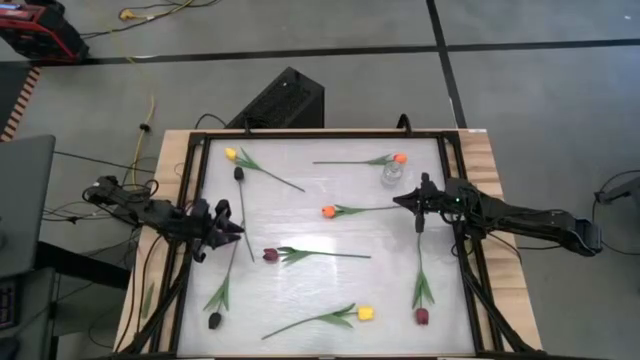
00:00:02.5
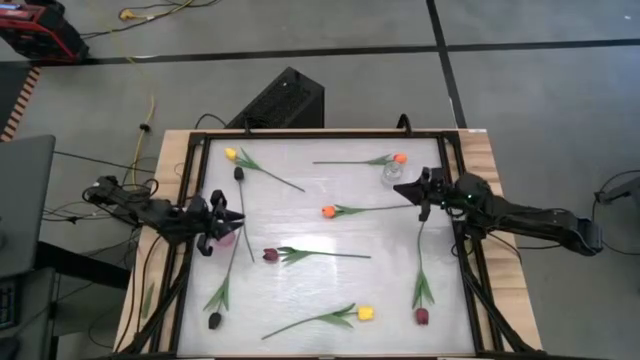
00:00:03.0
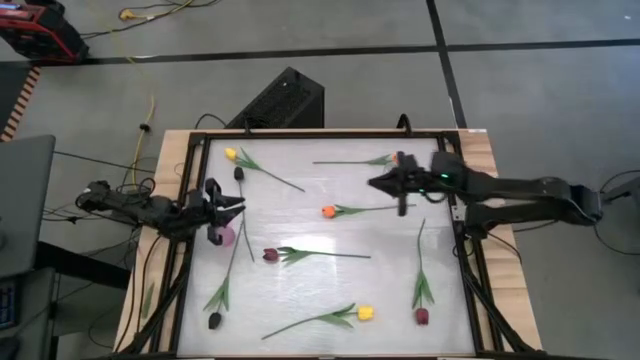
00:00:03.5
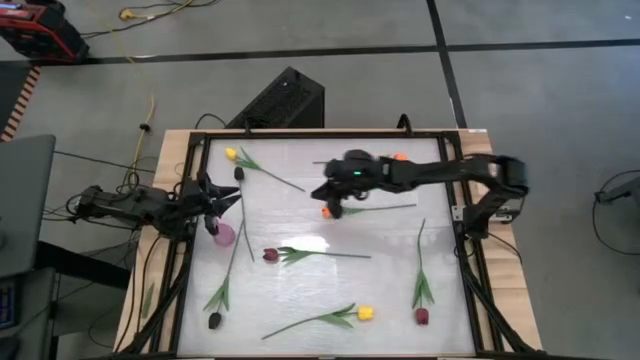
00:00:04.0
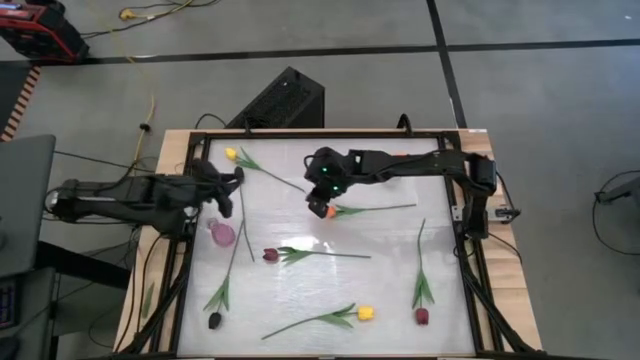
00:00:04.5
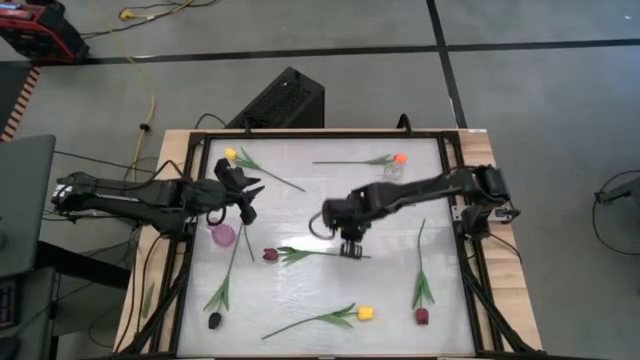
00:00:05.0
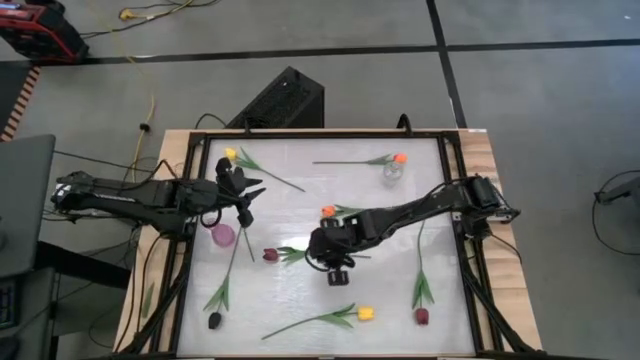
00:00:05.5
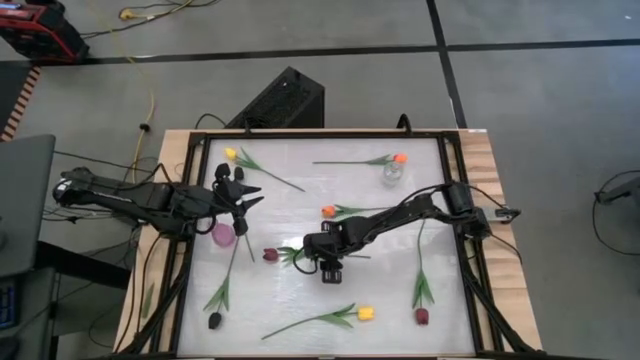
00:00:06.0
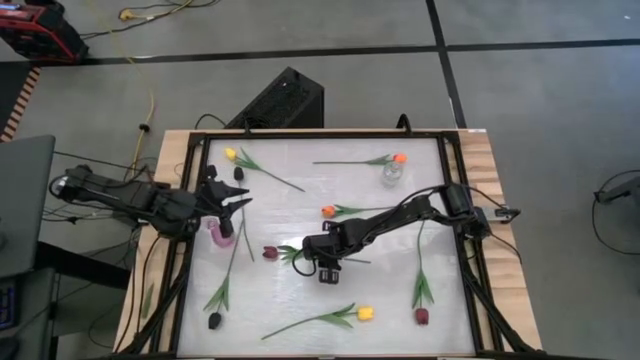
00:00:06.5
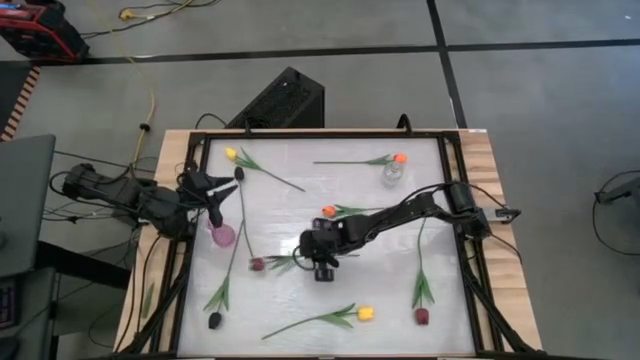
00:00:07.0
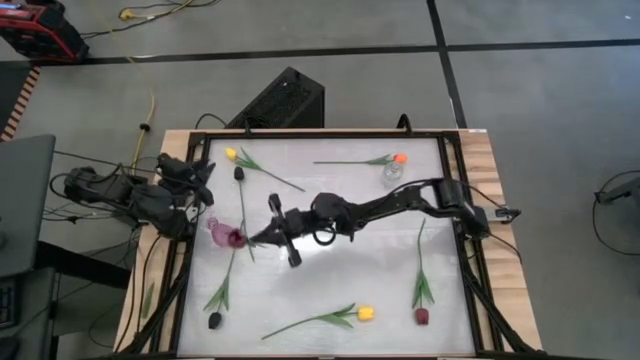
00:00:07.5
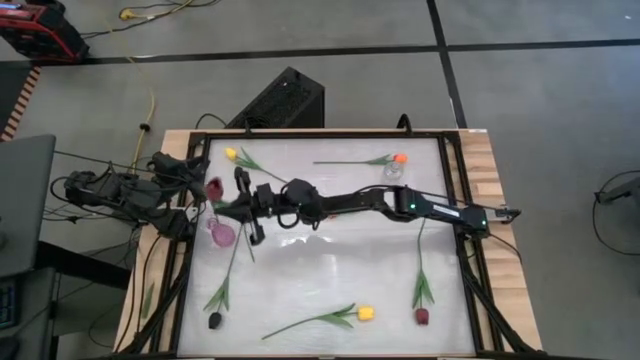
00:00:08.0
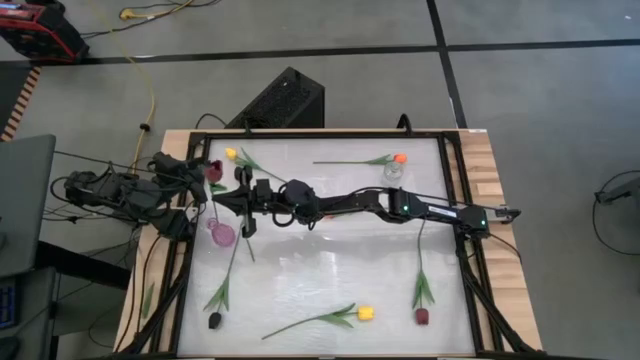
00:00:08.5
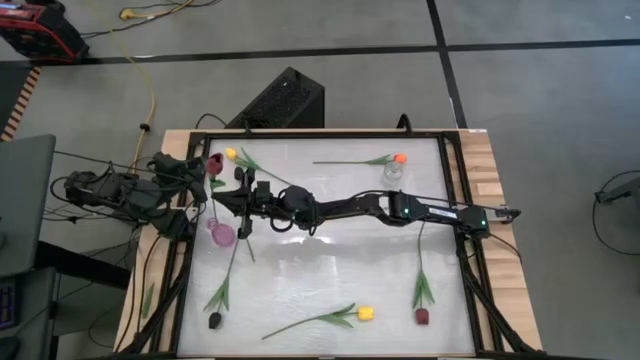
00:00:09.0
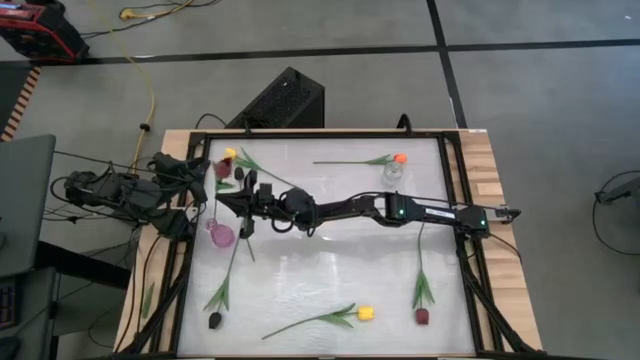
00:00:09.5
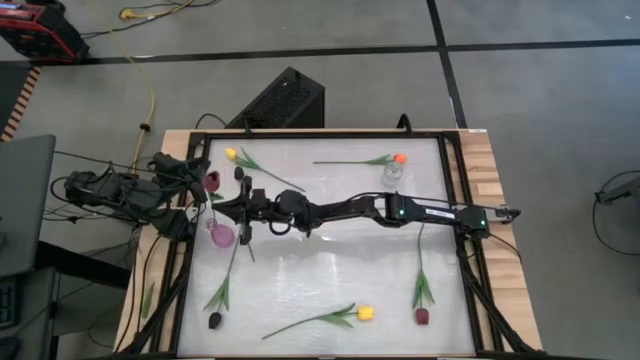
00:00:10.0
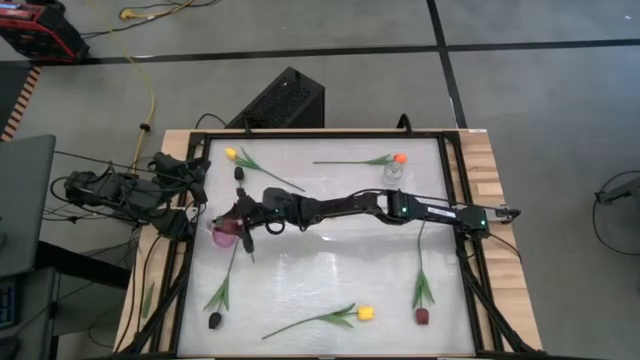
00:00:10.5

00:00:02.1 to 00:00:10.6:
Task: Sort flowers into vase by color
Put the left red tulip into the pink vase

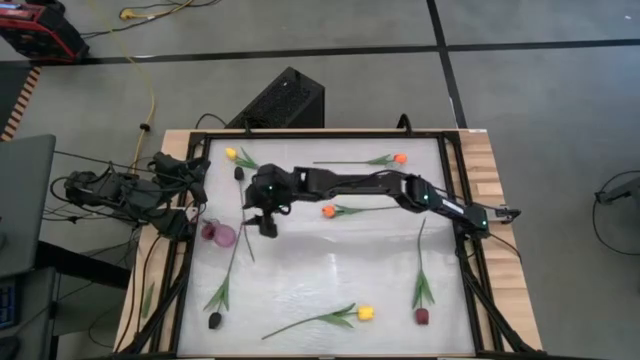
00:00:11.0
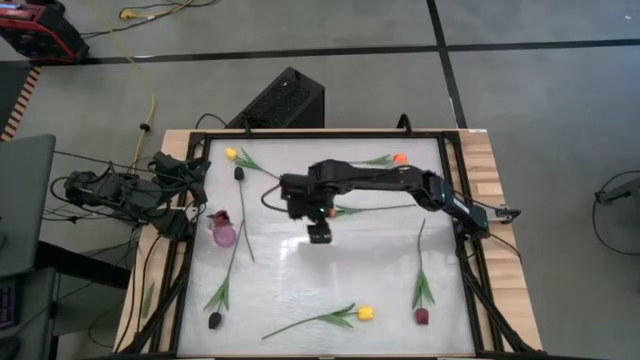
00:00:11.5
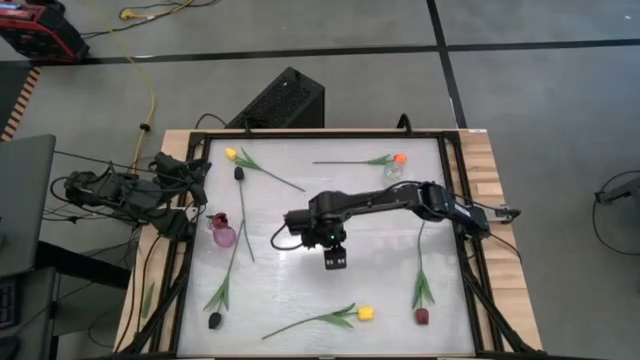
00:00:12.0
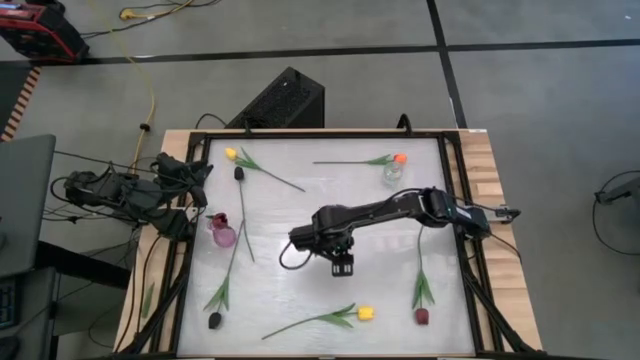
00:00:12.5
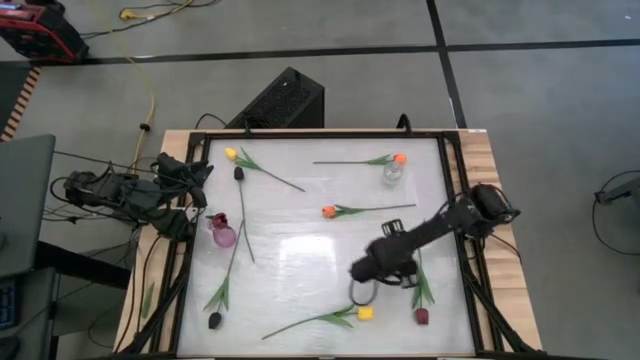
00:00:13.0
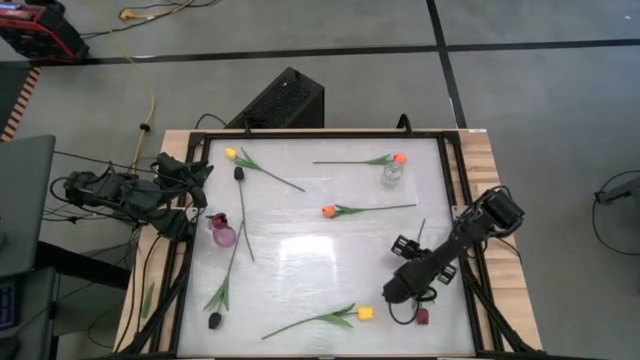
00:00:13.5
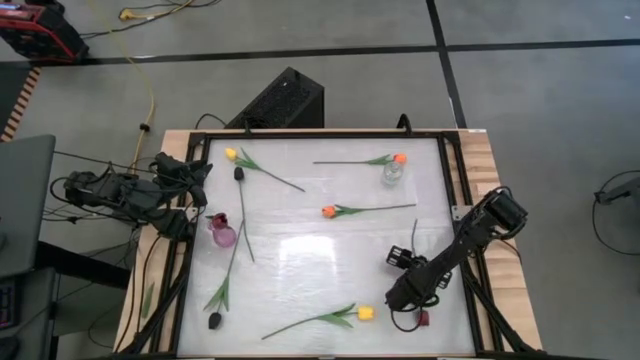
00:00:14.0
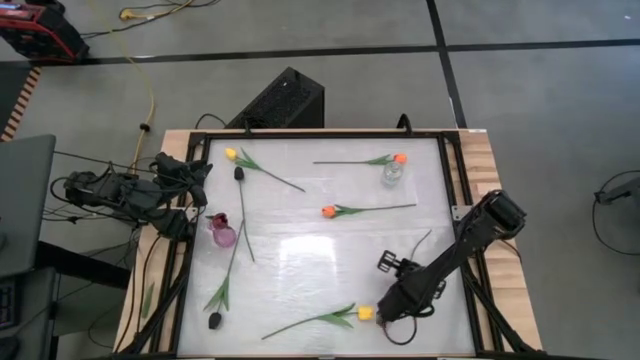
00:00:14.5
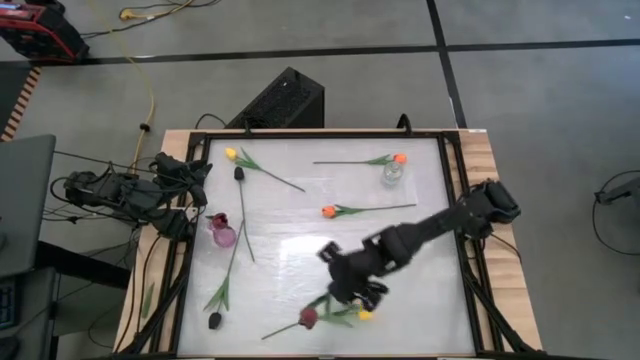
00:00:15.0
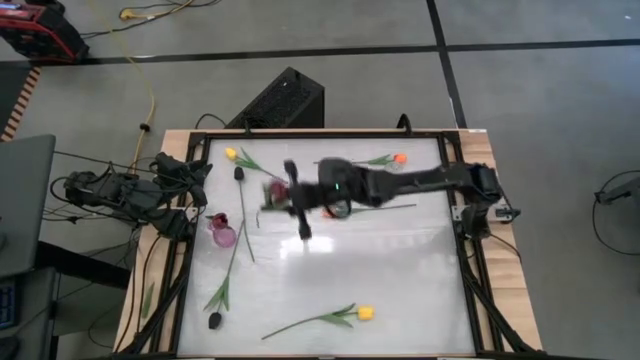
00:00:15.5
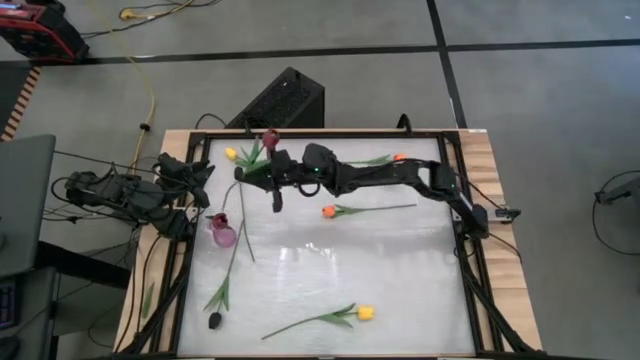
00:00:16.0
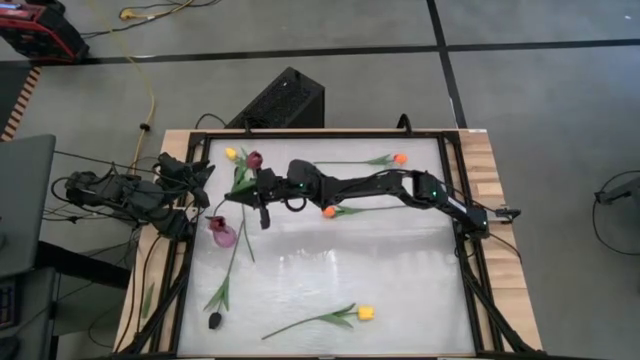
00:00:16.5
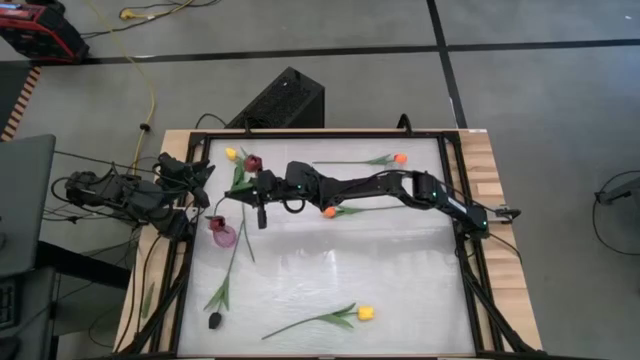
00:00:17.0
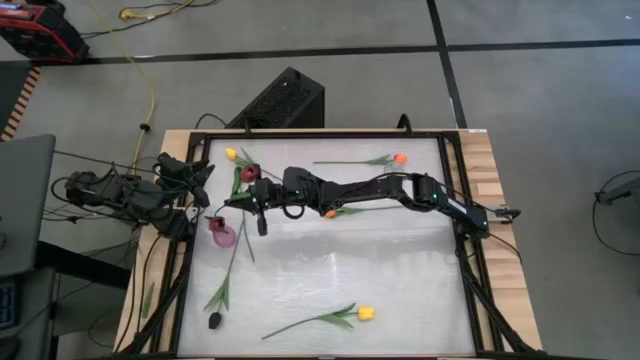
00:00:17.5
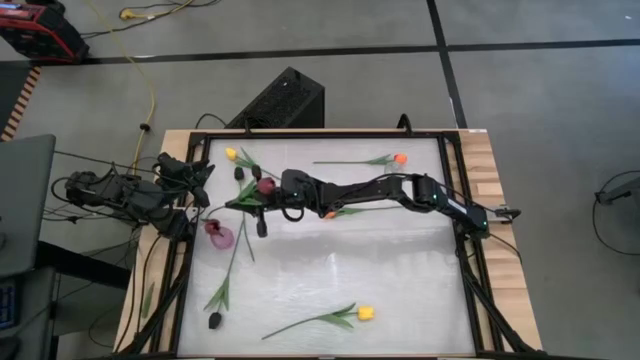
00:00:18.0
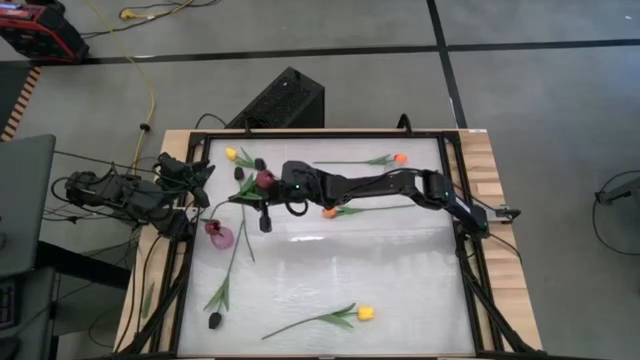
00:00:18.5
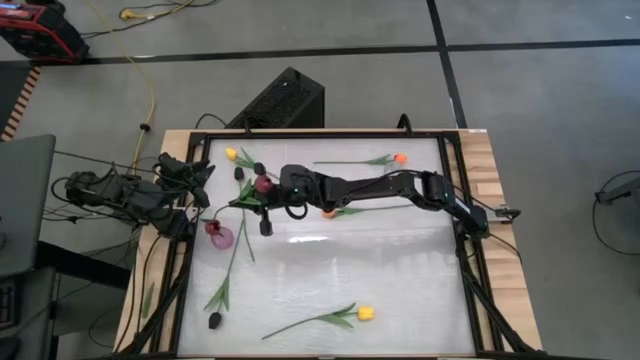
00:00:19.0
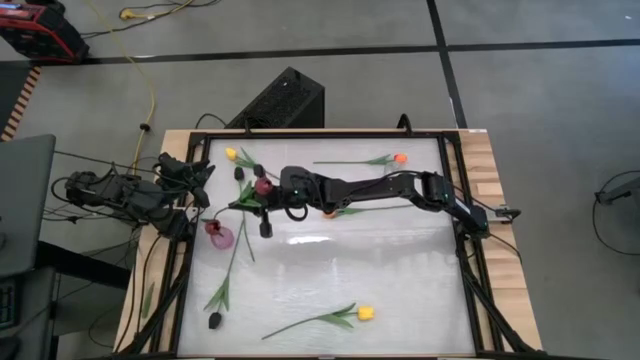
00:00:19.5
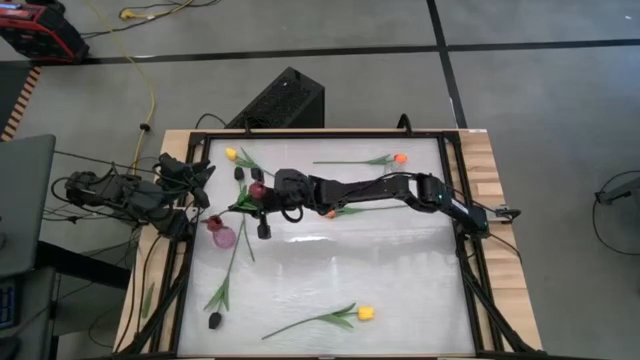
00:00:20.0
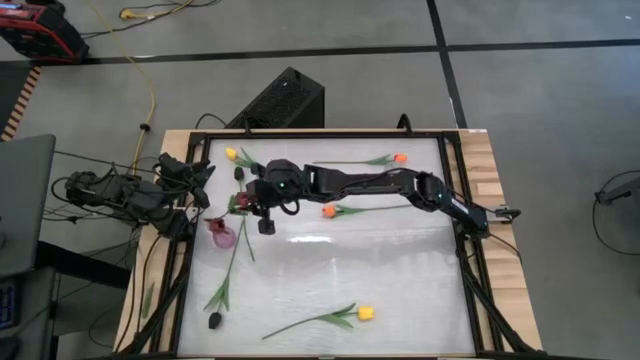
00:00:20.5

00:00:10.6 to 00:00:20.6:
Put the red tulip into the pink vase

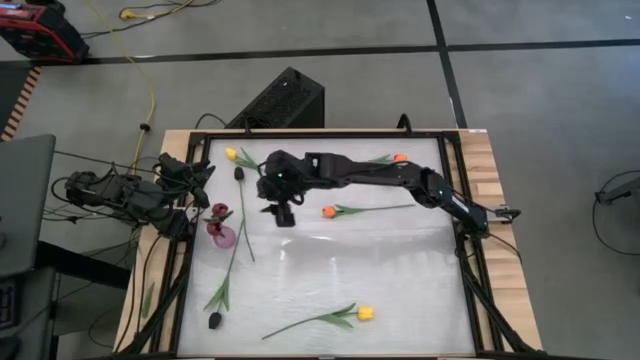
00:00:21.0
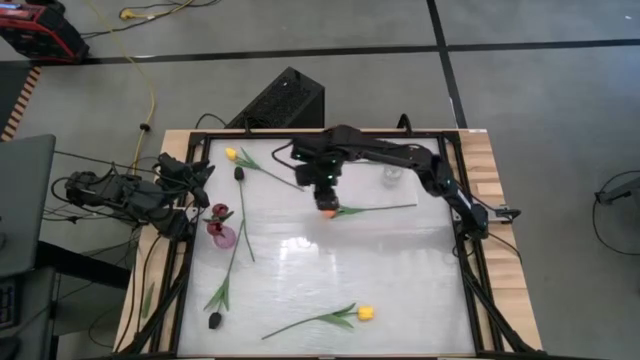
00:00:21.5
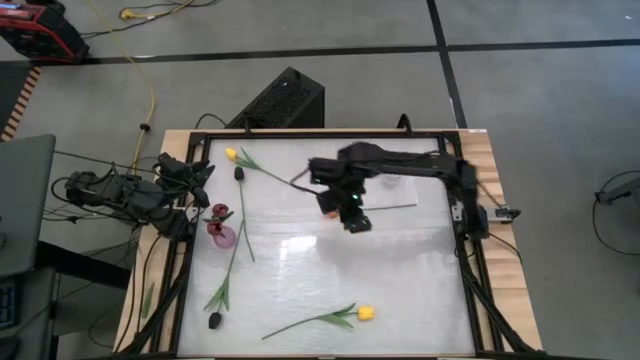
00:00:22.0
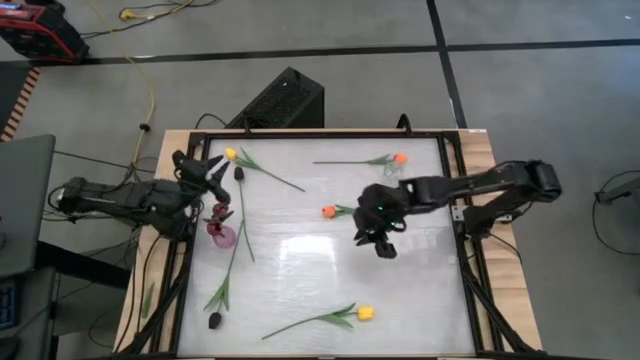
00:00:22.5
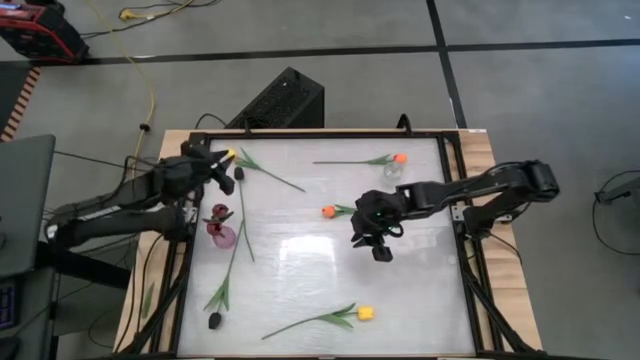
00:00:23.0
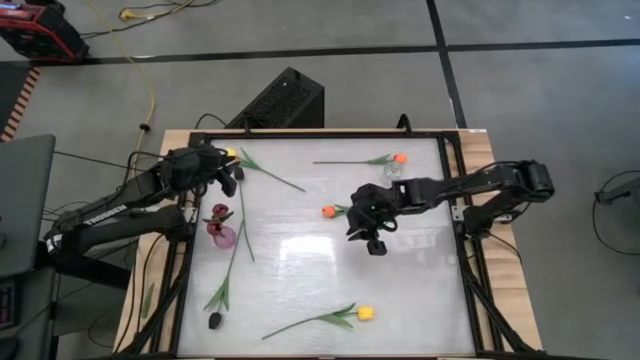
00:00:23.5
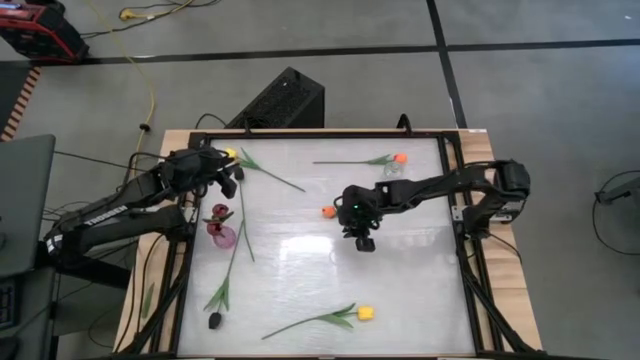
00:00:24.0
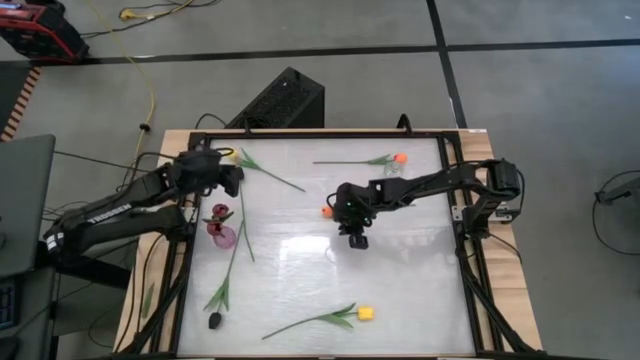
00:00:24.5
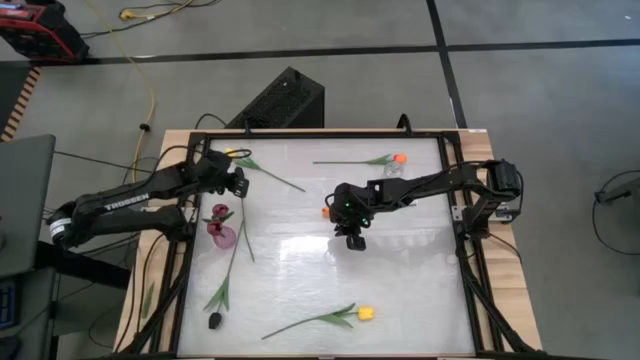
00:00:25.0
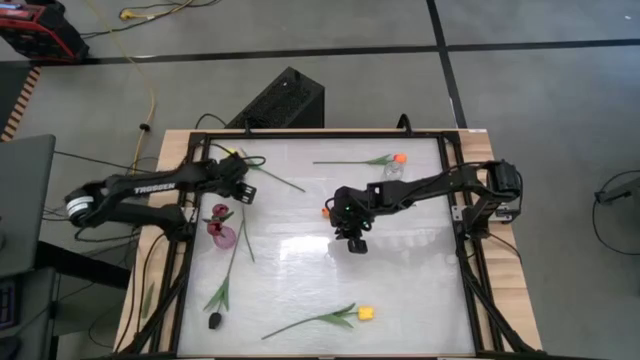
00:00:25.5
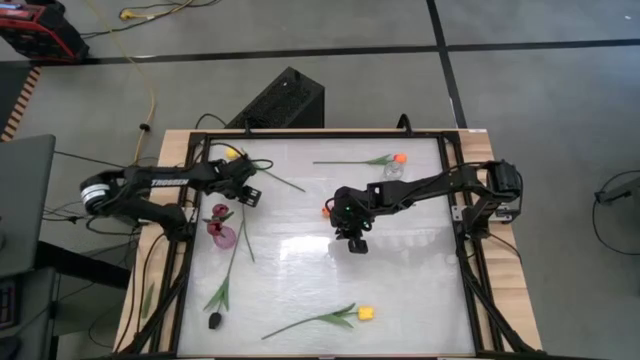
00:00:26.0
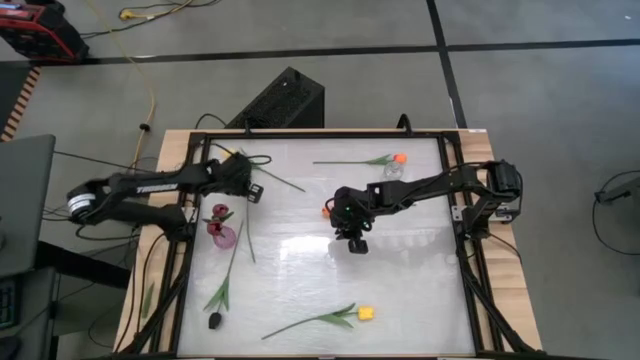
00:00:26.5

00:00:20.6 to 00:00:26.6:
Put the top black tulip into the pink vase
